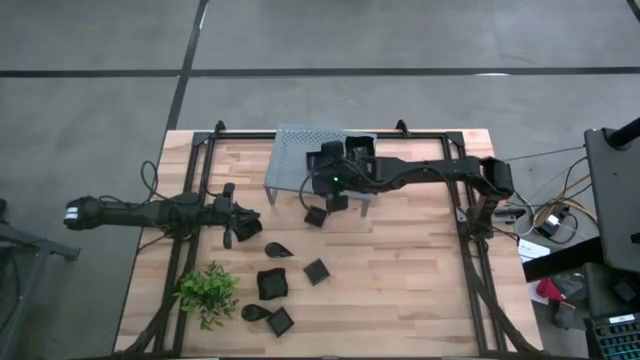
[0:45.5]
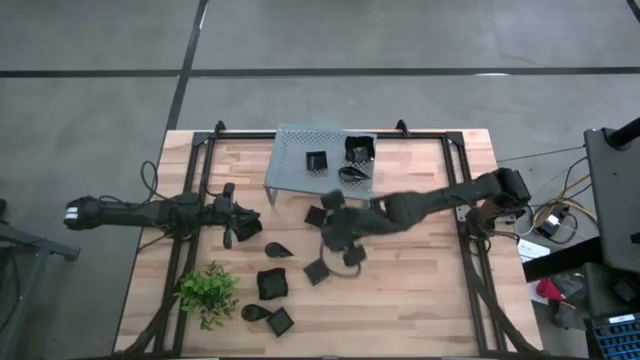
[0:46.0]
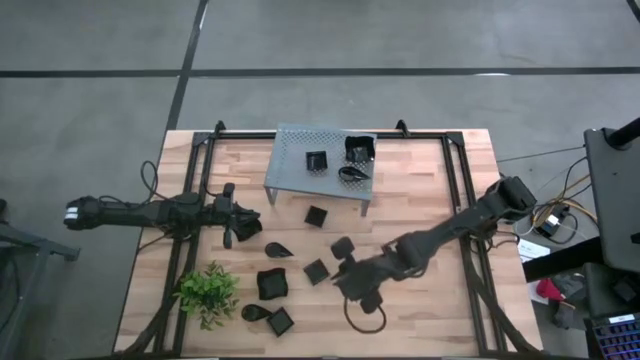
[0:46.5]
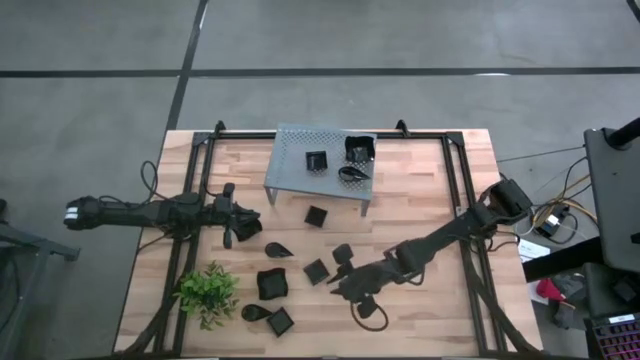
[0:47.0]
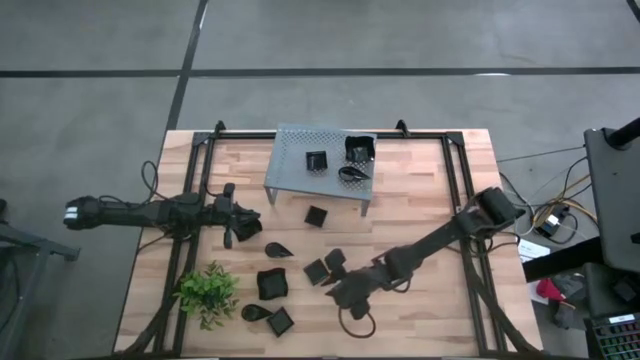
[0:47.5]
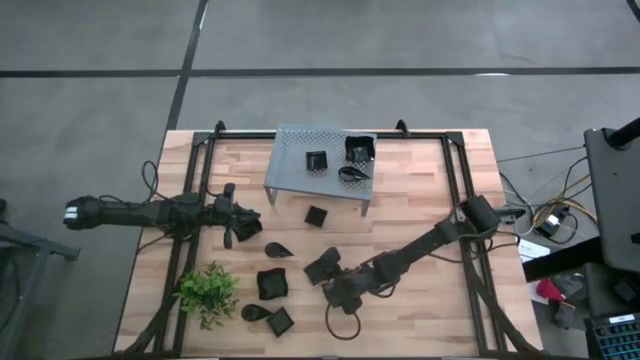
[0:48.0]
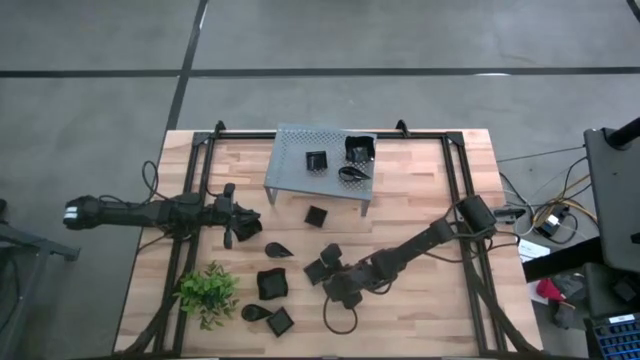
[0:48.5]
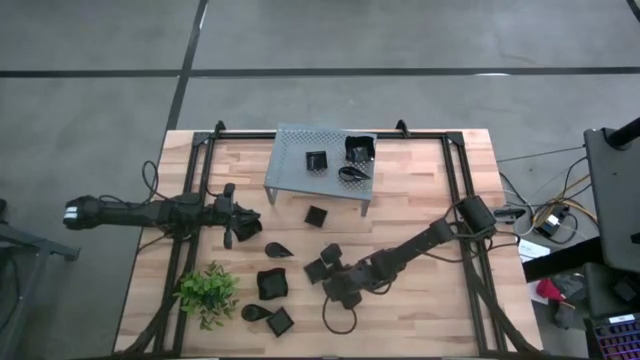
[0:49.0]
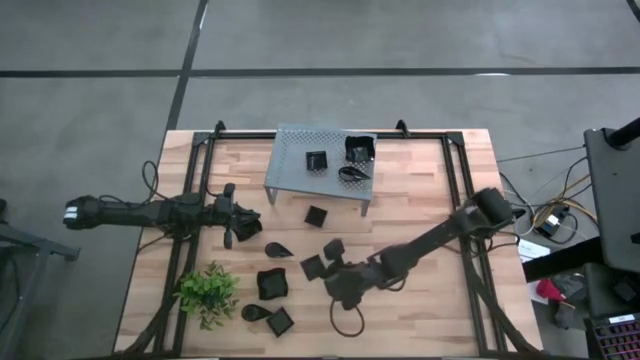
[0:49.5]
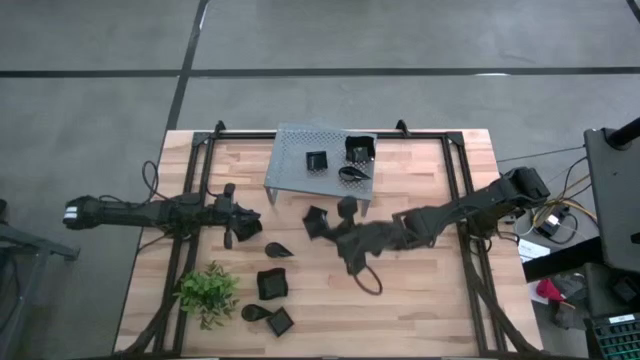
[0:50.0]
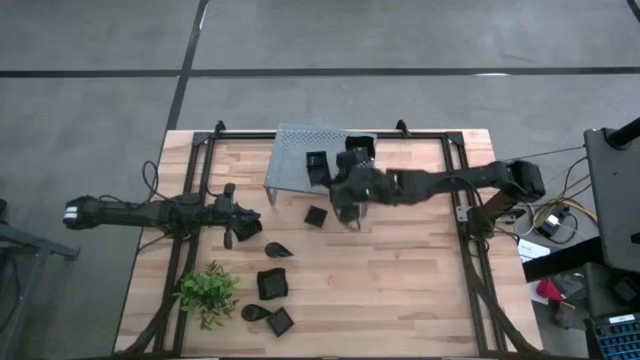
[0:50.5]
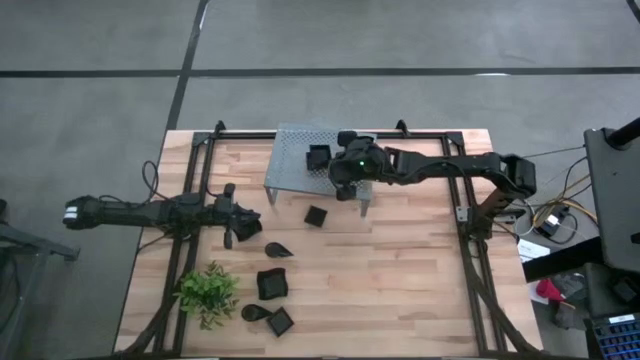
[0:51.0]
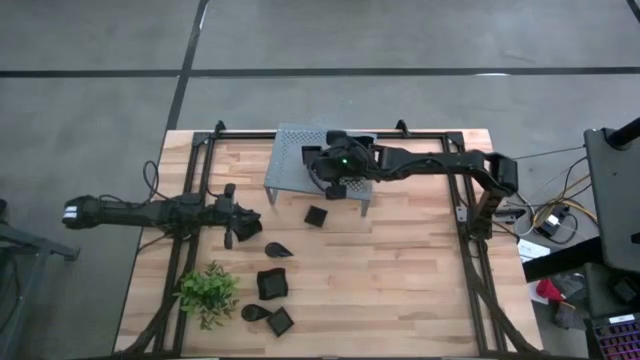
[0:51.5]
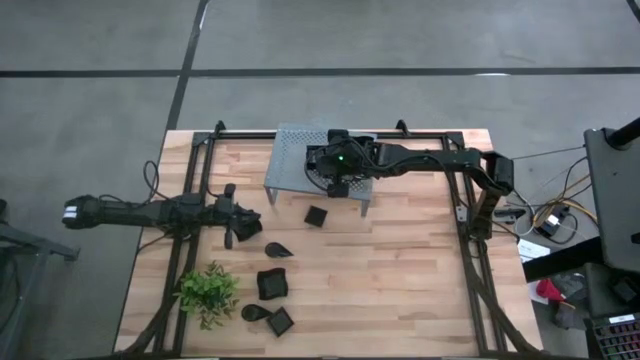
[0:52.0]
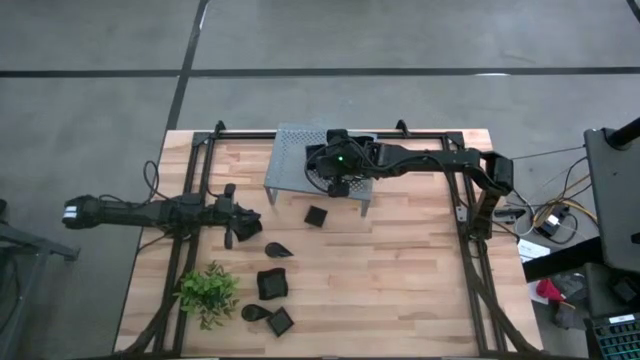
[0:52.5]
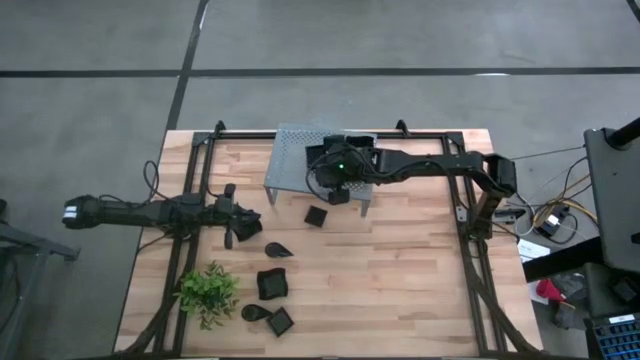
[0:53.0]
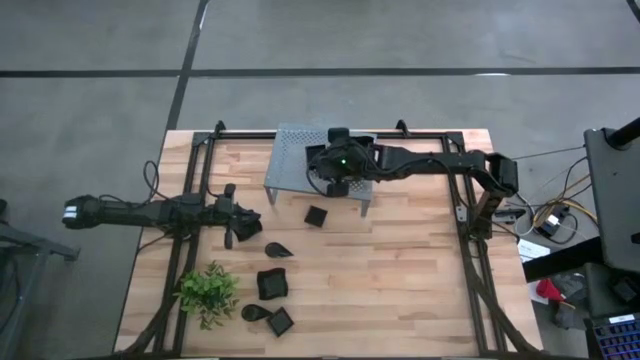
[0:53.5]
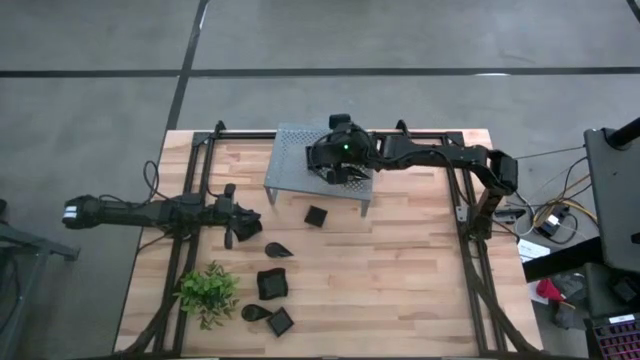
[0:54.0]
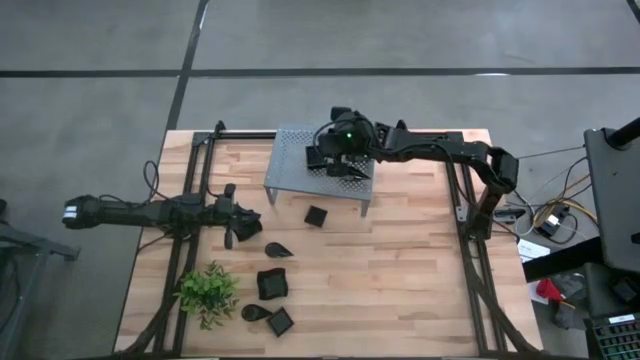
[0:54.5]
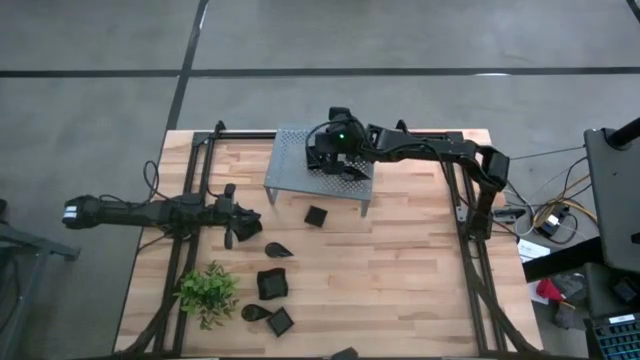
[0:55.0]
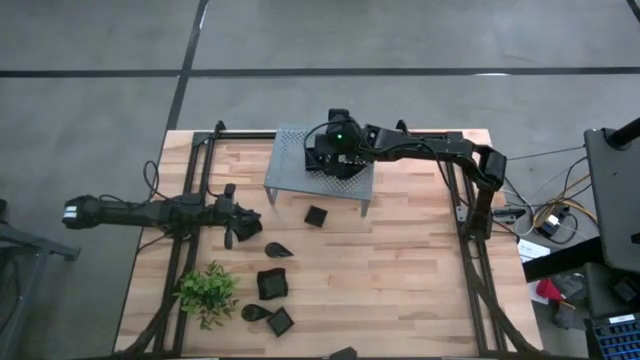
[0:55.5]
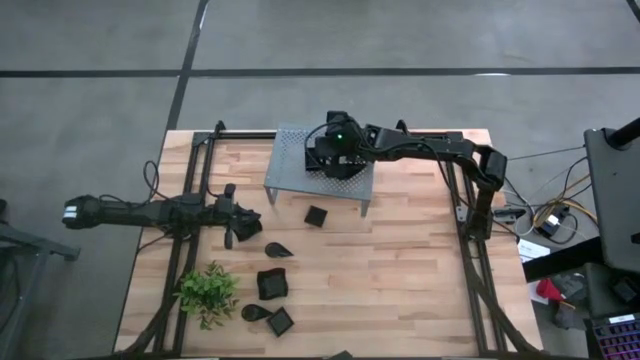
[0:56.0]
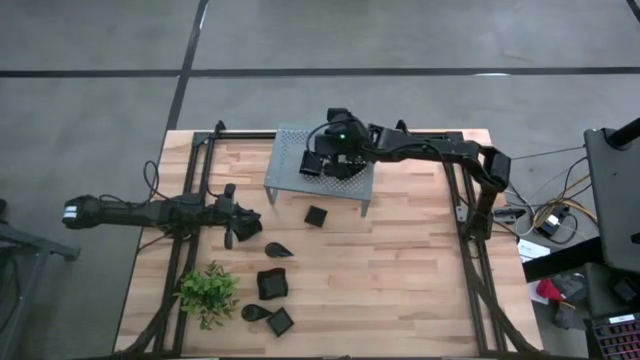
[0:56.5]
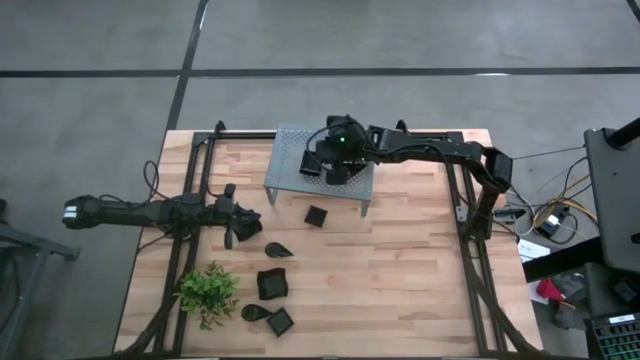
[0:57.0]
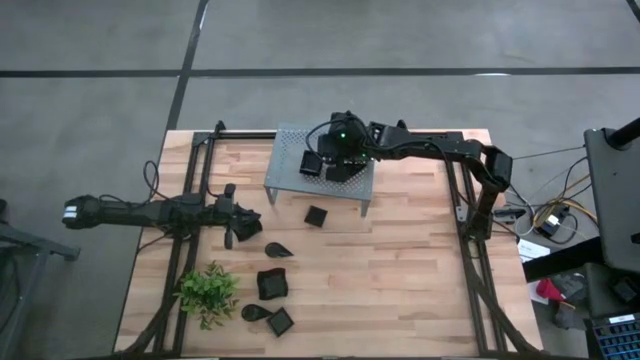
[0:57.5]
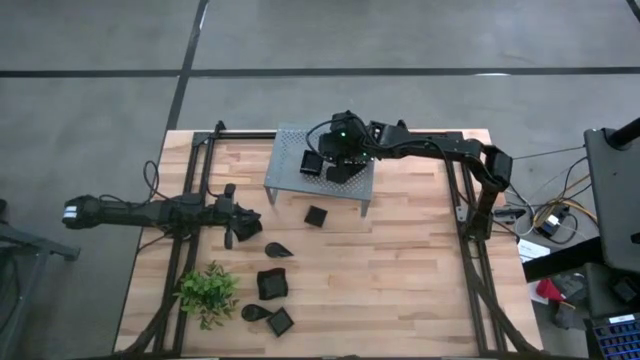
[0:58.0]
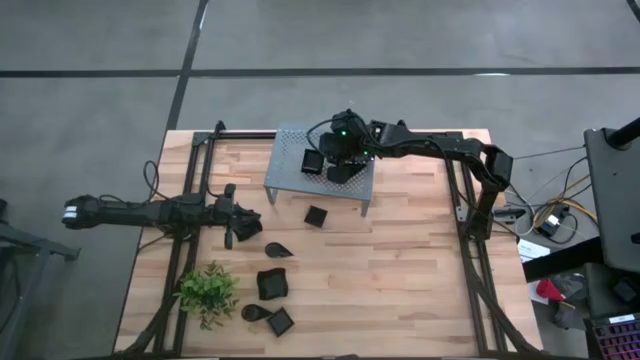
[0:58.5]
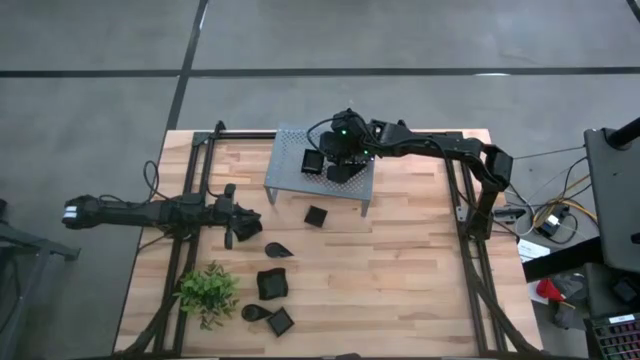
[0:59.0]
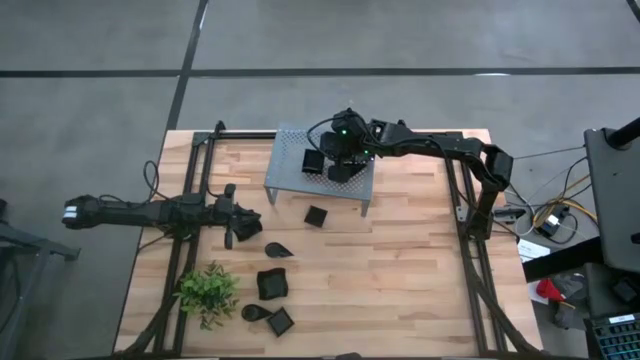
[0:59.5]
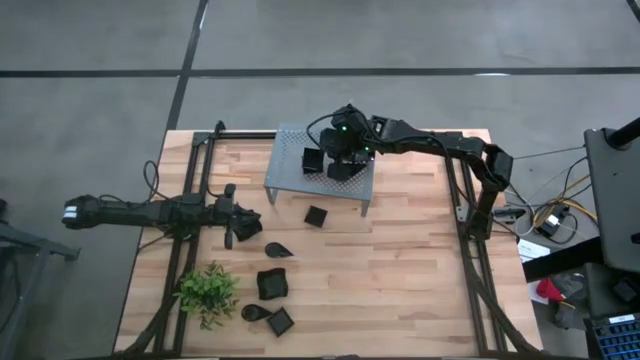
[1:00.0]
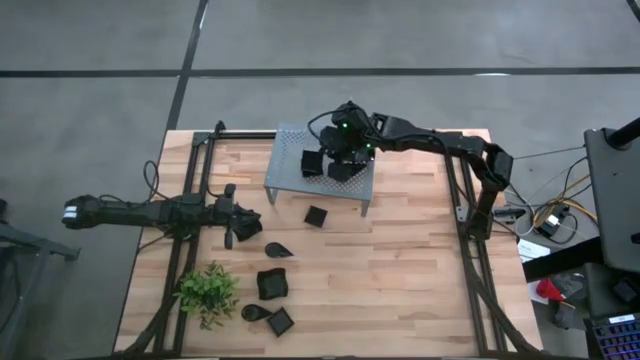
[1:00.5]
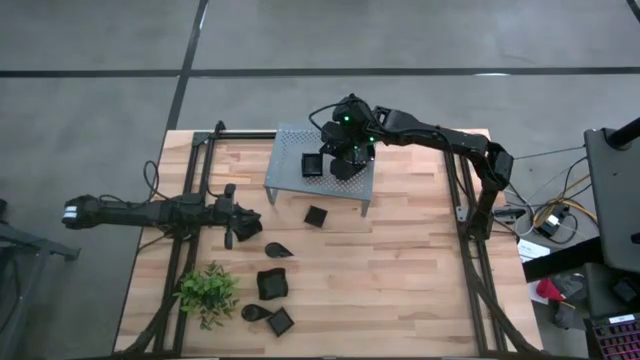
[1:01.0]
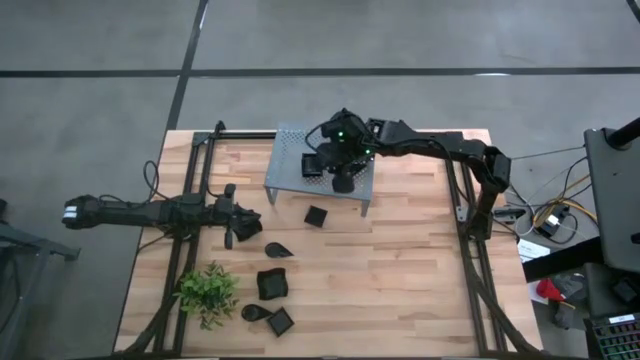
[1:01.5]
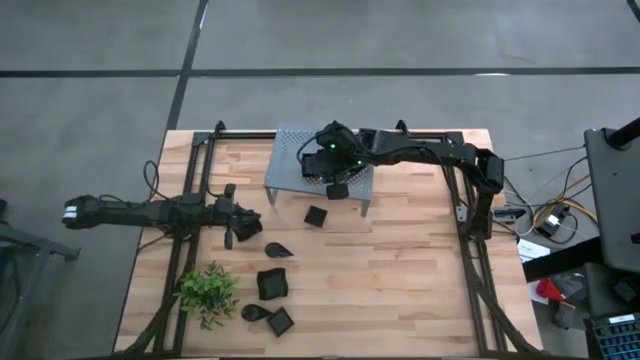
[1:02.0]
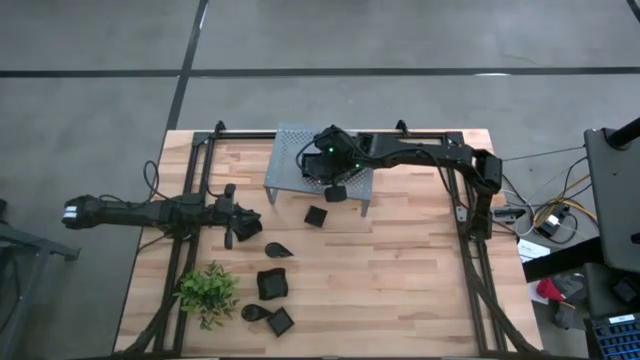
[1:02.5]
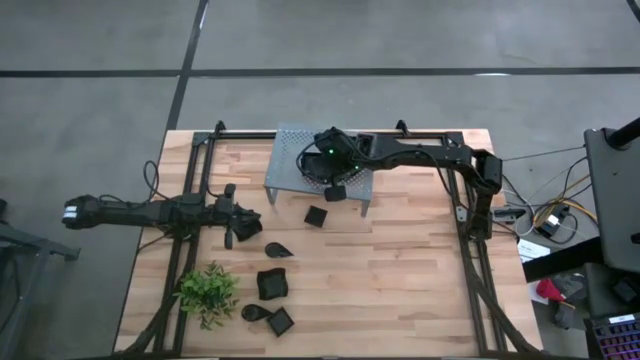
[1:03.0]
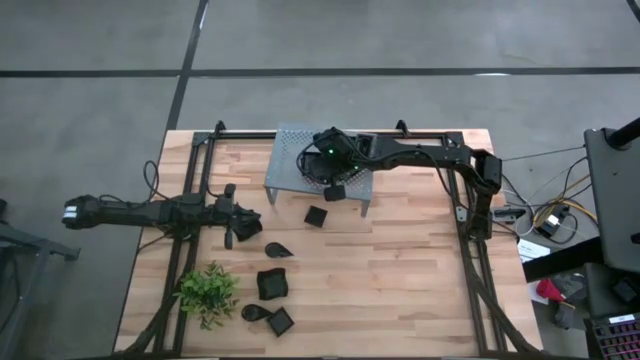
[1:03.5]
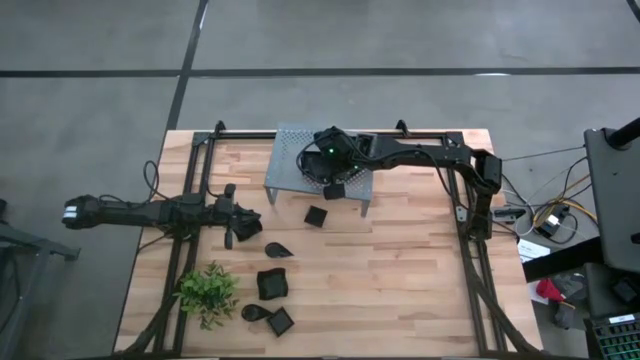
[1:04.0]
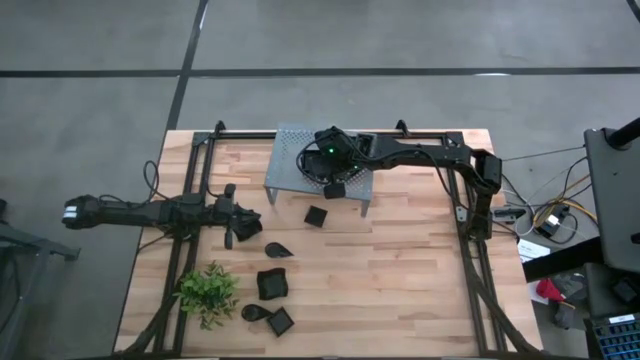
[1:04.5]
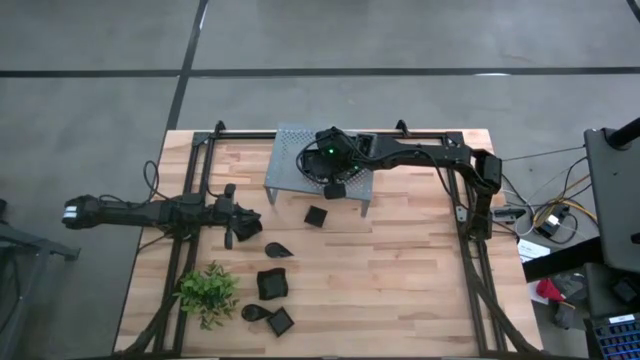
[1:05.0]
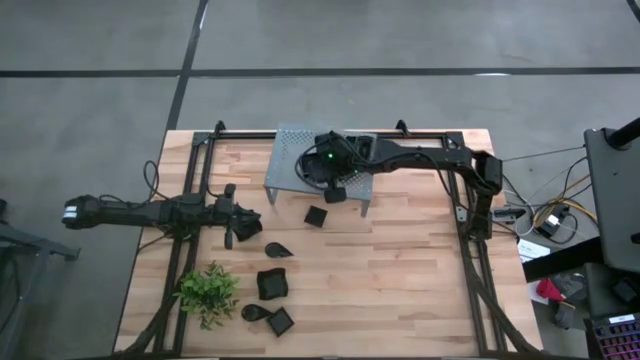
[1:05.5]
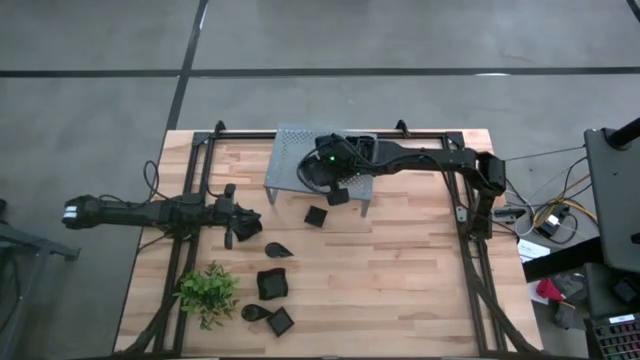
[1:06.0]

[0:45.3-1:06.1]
Task: Pick & Place Mini shaped plates
Stack the black square plate on top of the other black square plate on the shelf

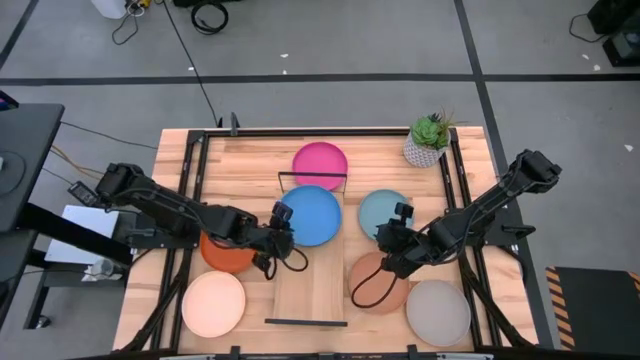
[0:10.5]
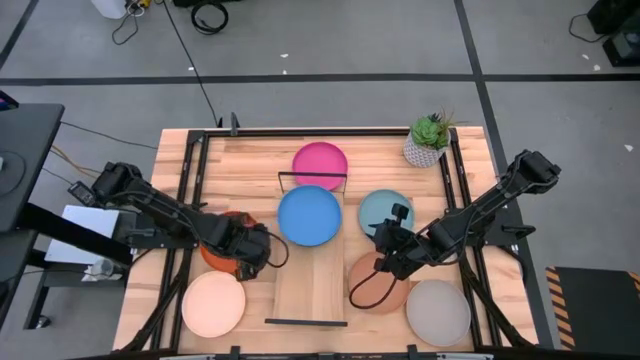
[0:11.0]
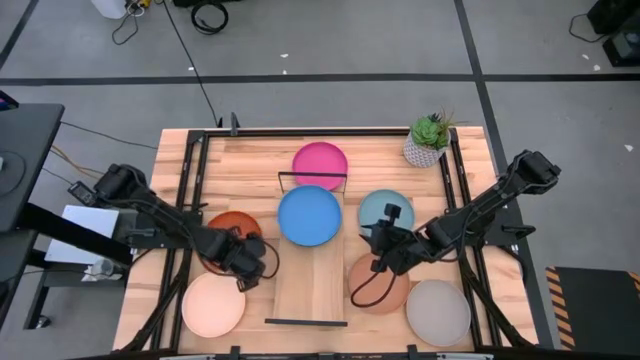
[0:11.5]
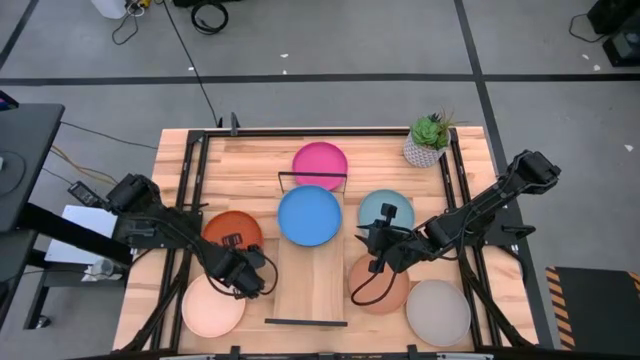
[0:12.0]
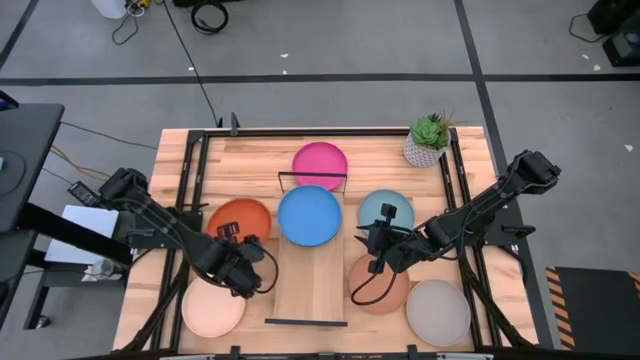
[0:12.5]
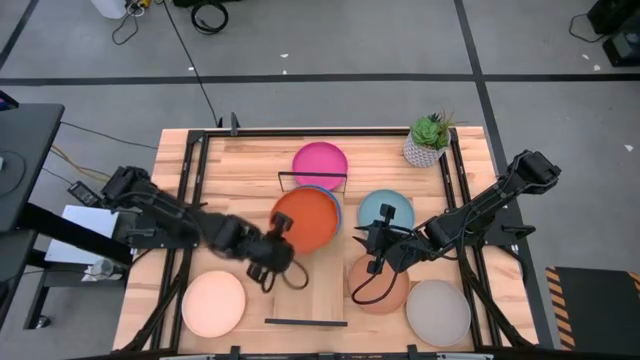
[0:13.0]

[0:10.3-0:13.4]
Task: Place and stack plates onto a shelf
Stack the orange plate on top of the blue plate
